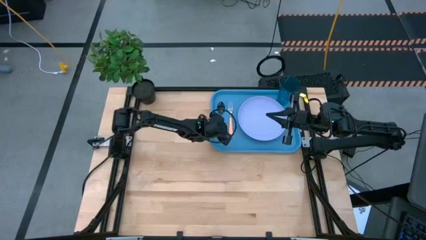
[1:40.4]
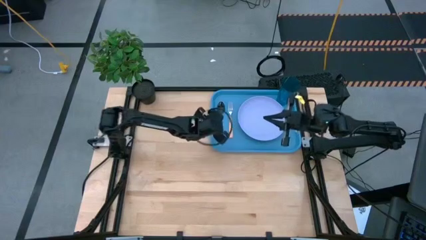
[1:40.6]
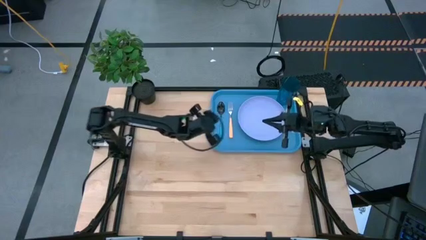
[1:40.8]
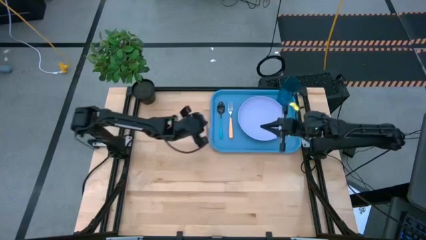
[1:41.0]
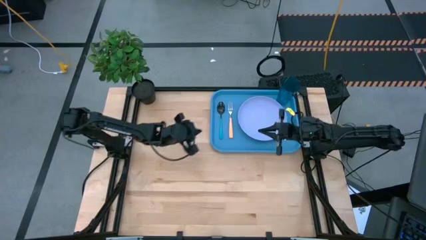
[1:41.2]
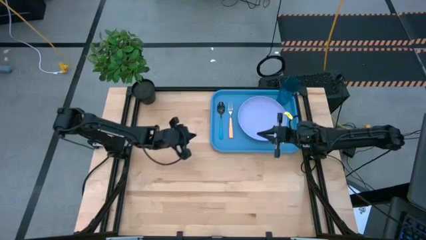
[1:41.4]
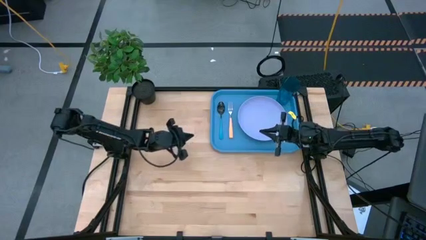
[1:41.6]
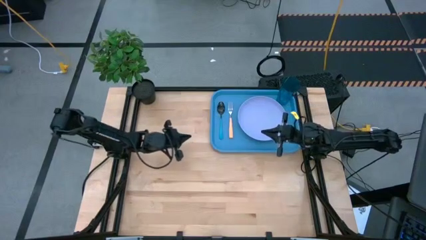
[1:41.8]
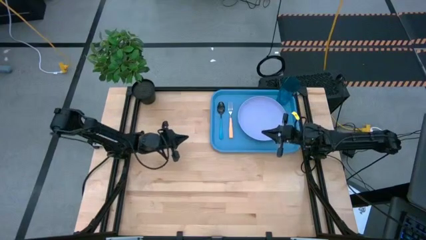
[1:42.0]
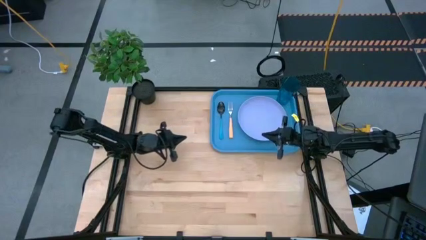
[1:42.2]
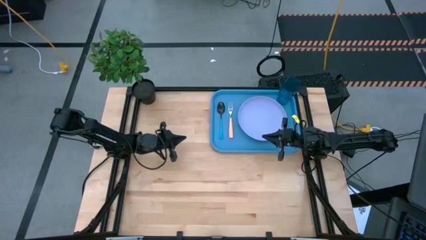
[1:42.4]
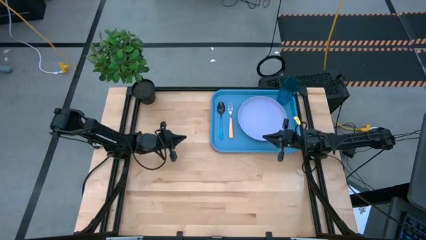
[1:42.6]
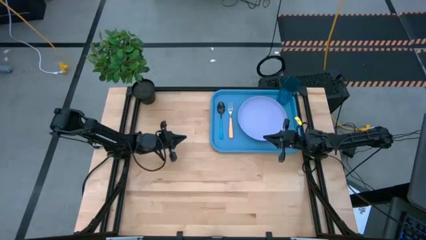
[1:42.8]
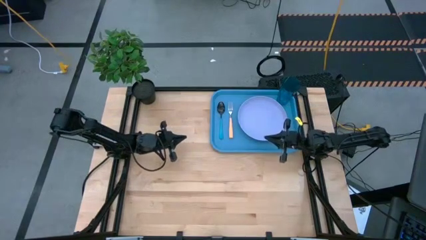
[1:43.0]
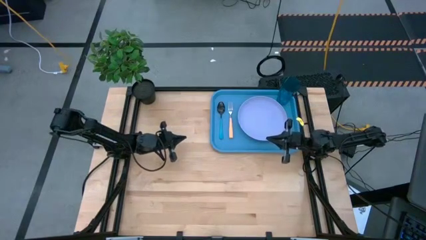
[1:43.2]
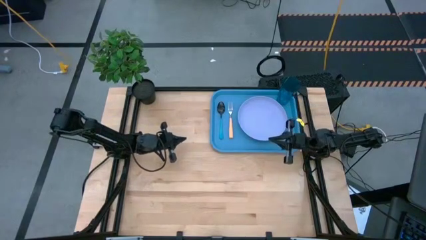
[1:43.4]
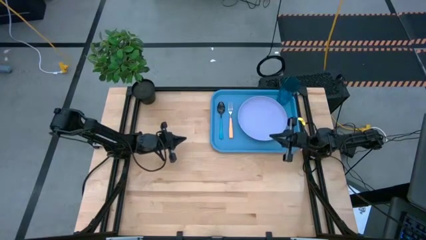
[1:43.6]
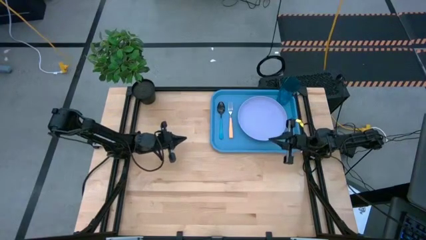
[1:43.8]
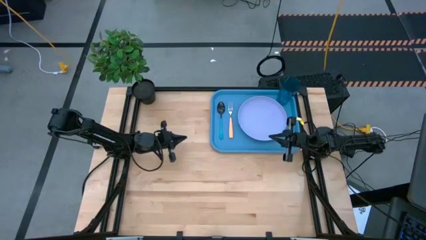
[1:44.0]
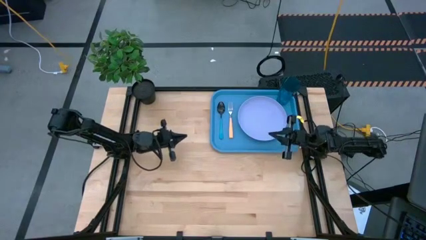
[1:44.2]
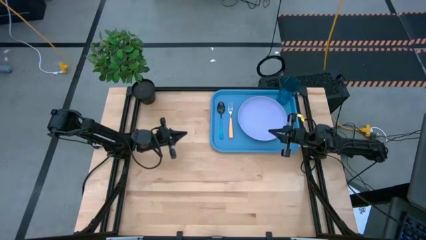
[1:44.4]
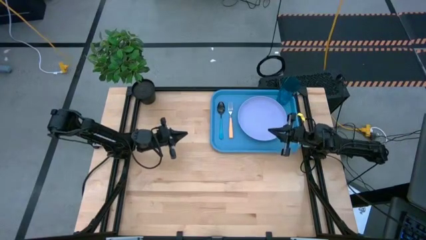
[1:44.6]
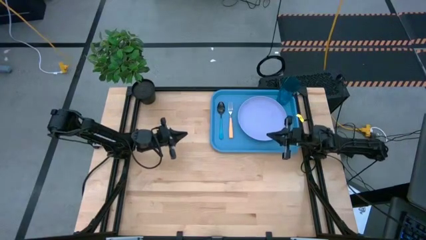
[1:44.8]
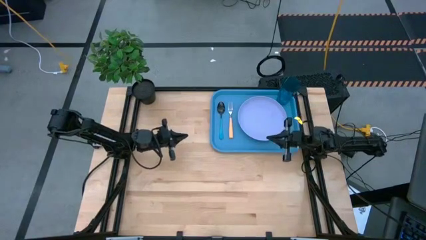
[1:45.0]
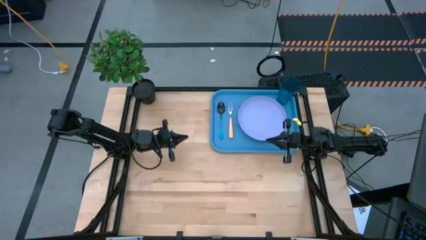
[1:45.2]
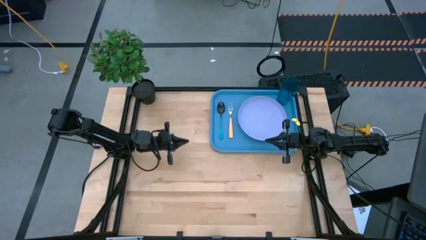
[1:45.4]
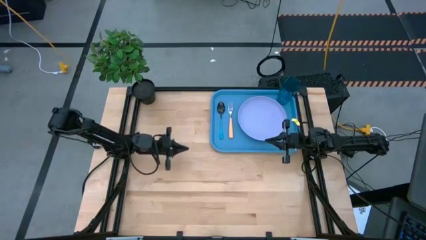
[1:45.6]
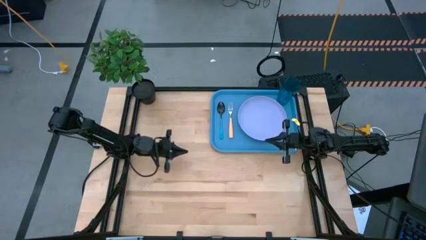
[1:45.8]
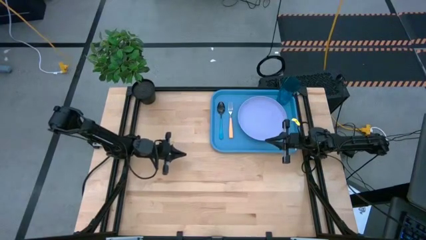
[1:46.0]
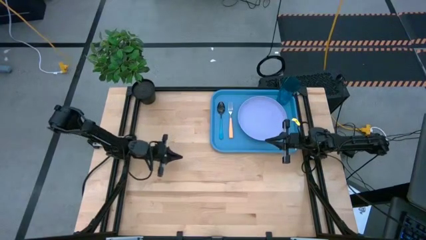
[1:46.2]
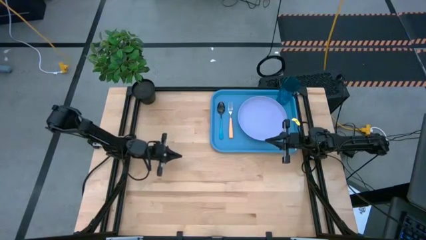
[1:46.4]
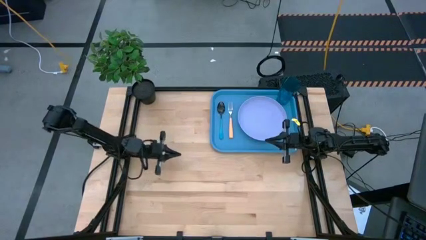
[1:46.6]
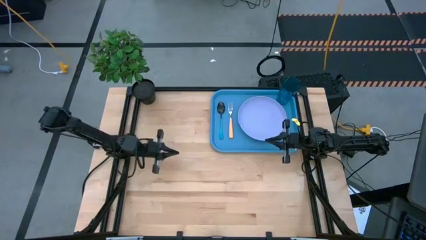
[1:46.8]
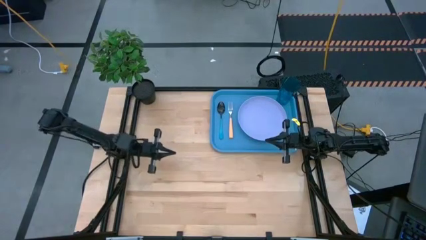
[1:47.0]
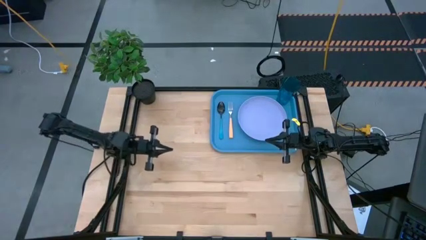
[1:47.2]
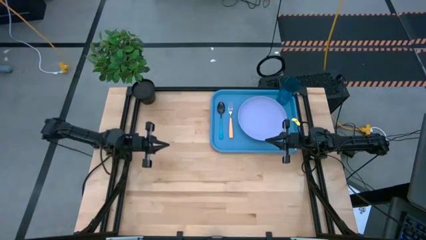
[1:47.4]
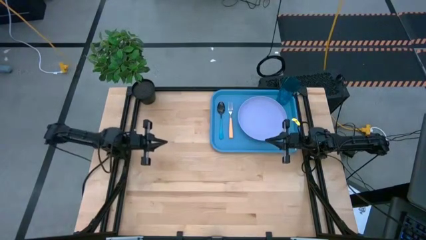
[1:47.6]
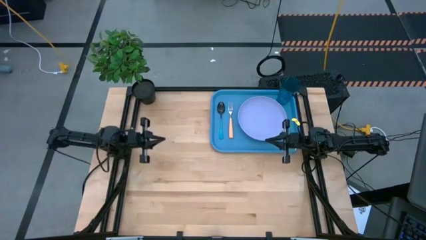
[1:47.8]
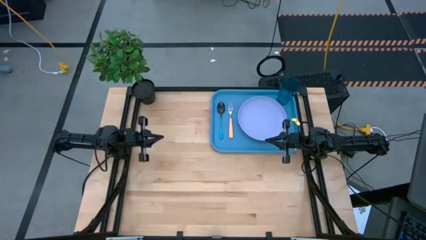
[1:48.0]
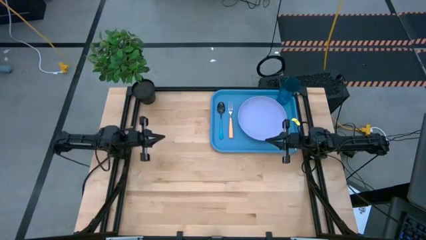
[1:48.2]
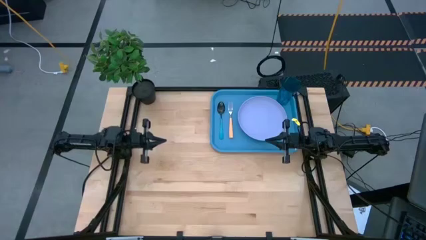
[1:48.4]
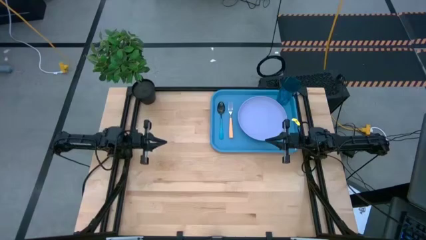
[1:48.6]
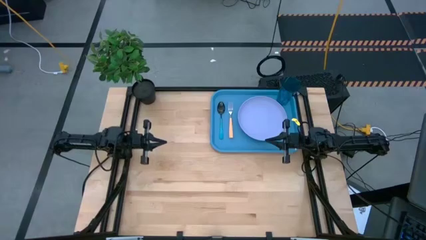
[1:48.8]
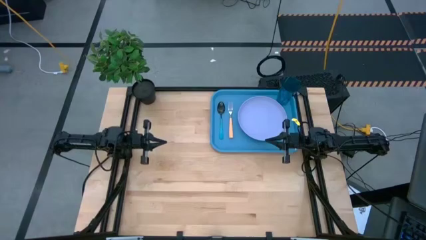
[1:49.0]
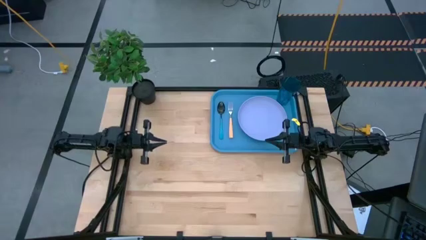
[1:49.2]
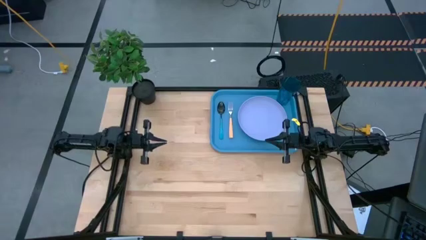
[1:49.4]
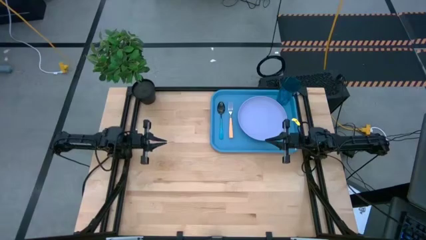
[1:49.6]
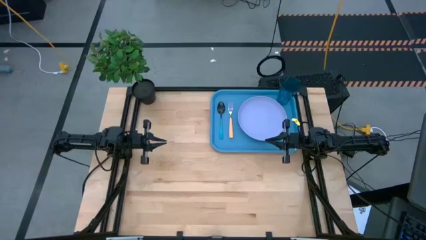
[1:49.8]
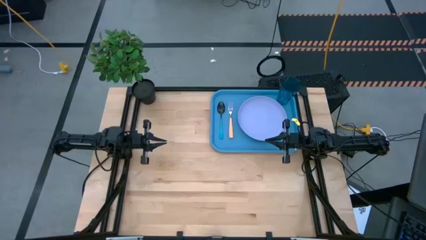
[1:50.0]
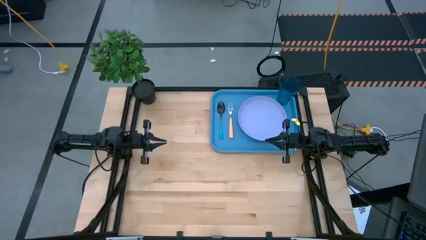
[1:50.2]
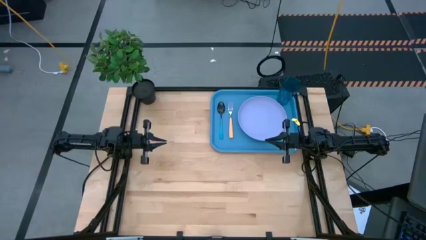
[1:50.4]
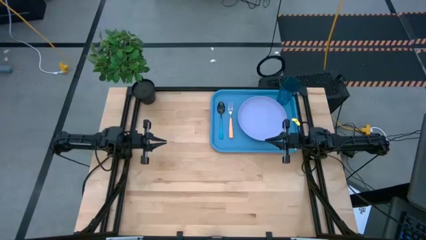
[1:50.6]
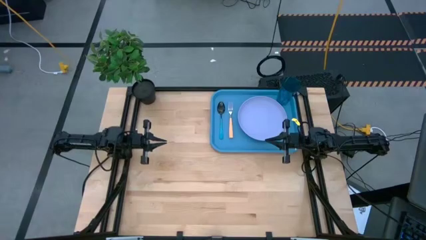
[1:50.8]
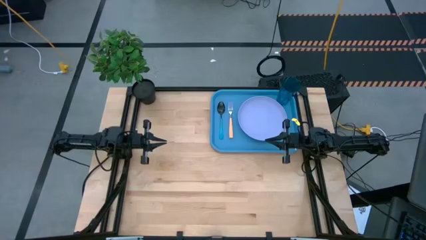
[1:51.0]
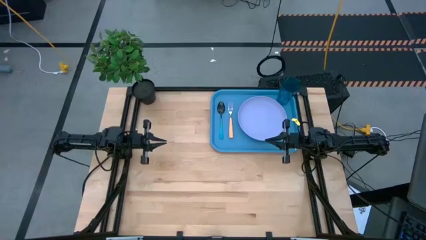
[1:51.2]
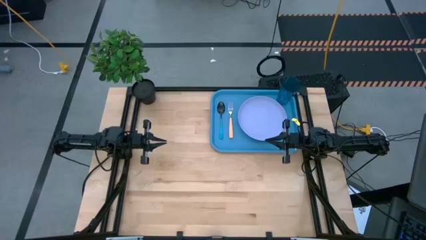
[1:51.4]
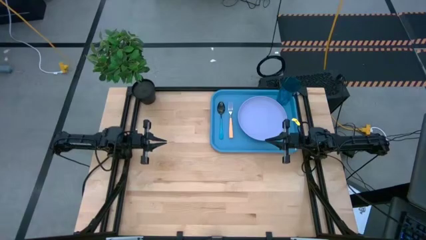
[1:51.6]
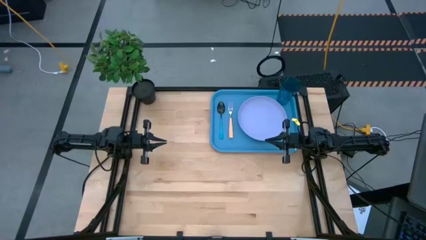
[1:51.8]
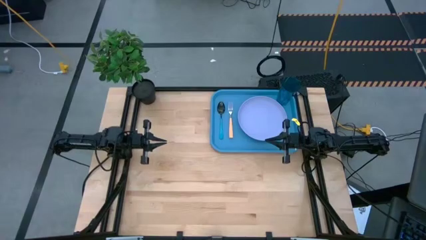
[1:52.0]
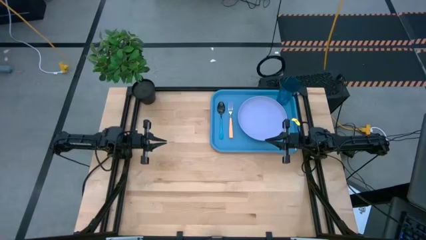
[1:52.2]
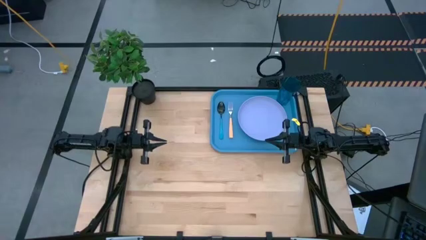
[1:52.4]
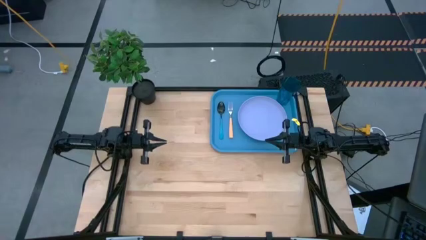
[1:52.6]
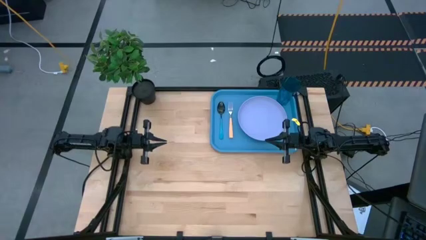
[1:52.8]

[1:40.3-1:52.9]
Task: Pick and place plate/cup/fork/spoon on tray
Return to Home Position

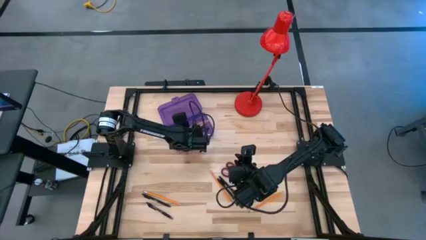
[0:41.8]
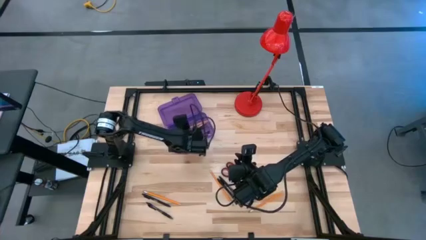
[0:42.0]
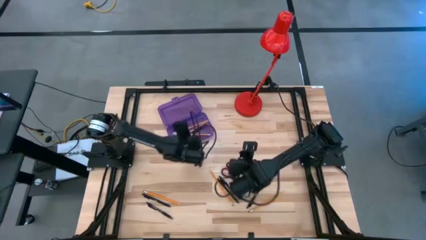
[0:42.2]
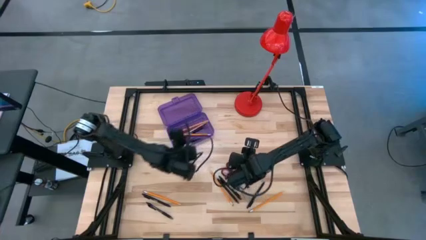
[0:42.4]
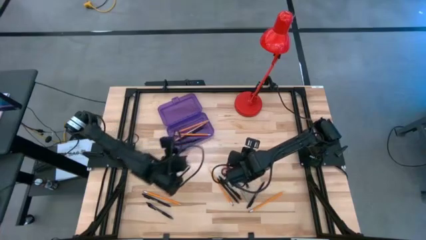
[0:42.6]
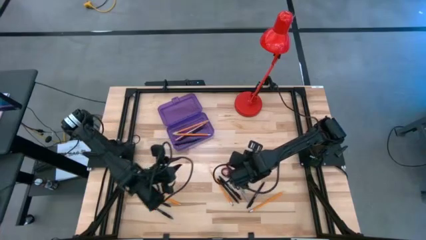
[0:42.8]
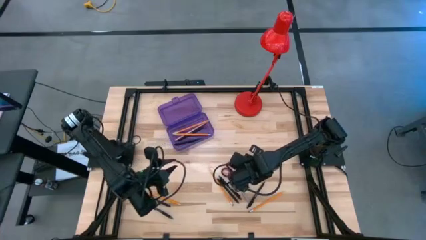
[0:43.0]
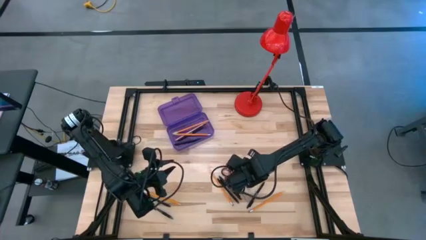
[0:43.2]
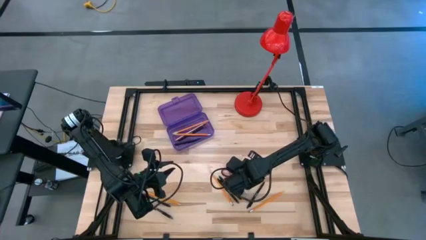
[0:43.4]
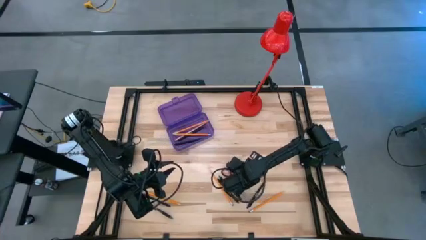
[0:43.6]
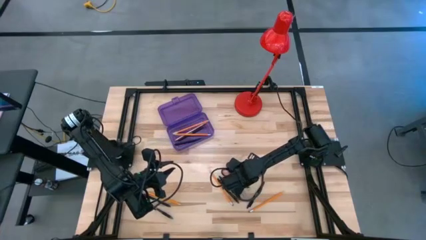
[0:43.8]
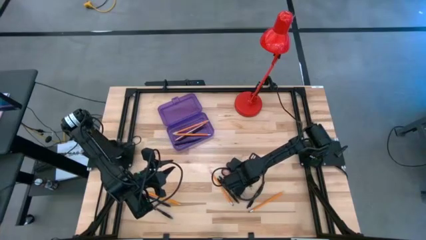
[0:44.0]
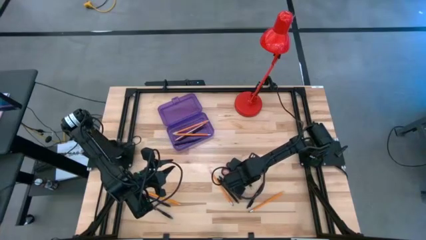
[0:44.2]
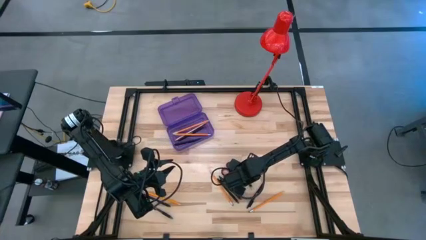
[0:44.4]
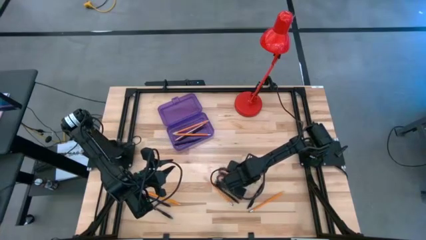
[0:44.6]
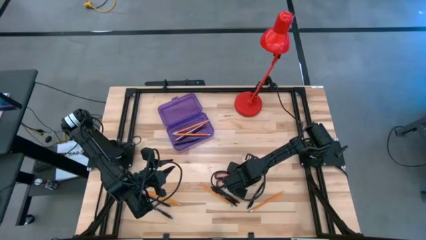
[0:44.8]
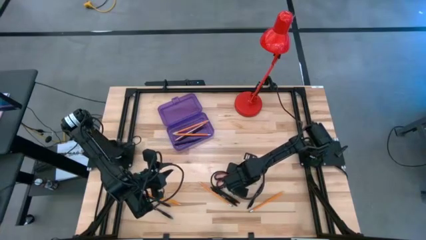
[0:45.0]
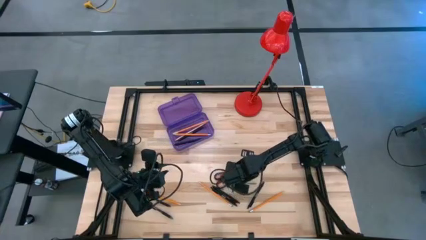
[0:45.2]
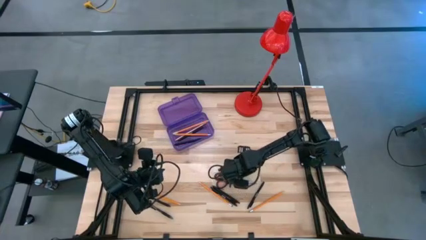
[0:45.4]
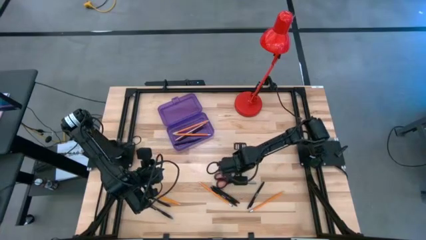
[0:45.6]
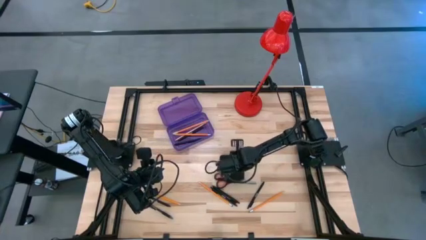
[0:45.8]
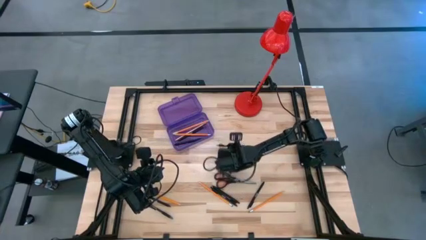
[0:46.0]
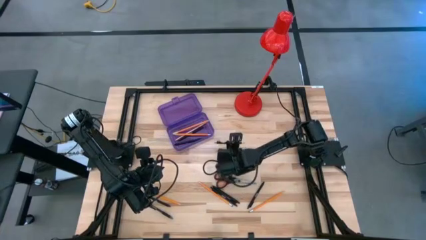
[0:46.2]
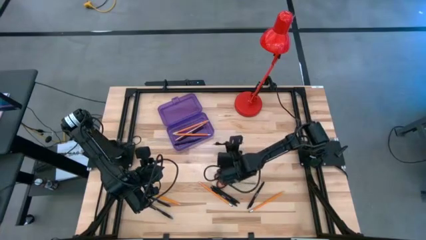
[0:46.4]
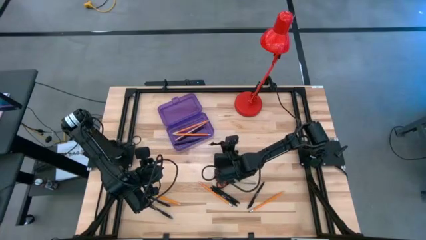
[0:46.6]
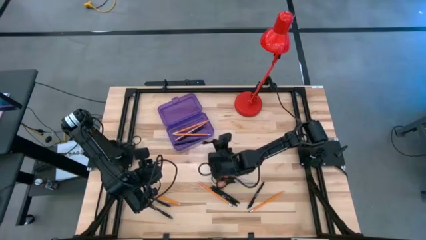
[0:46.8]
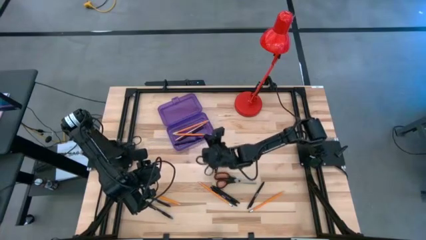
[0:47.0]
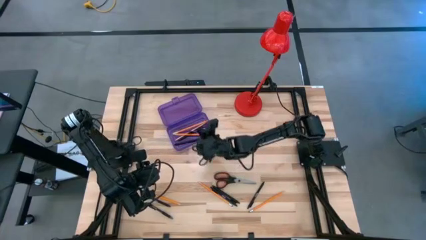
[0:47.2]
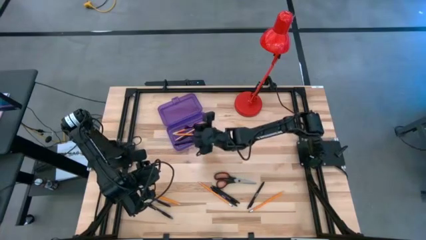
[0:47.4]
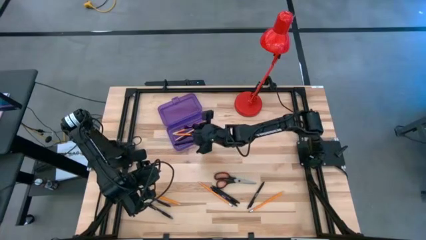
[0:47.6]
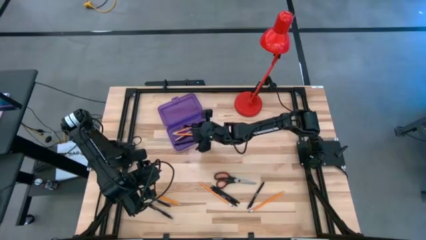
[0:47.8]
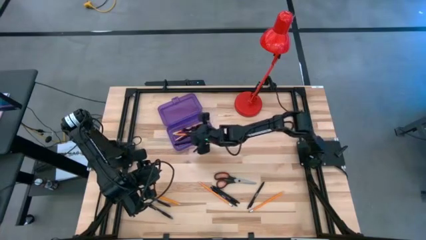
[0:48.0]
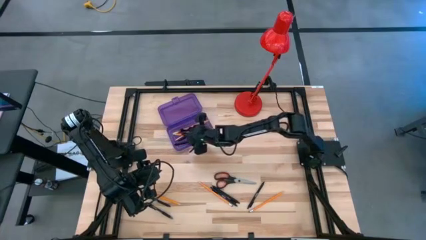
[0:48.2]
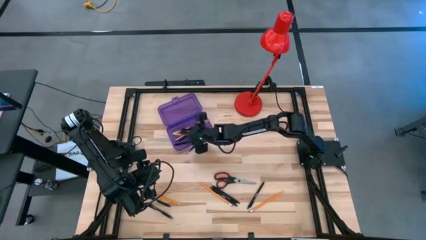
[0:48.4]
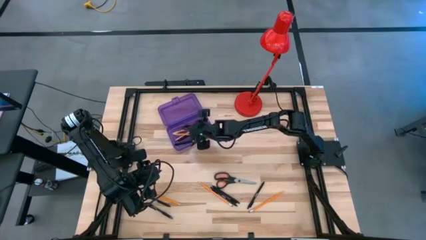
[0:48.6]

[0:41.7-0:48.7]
Task: Pick & place school supplies into a supply box
Put the transparent pen into the purple supply box
